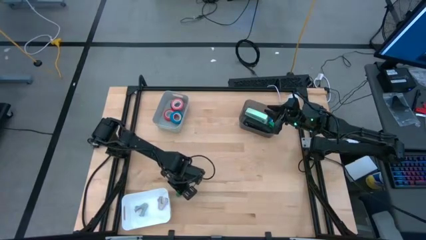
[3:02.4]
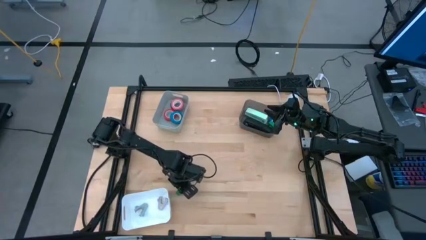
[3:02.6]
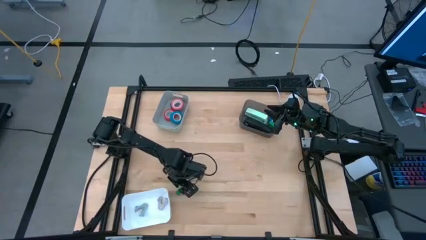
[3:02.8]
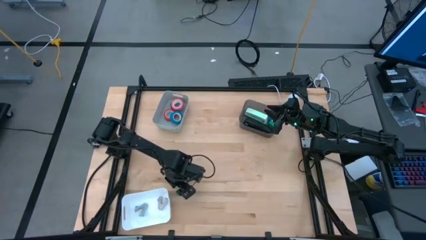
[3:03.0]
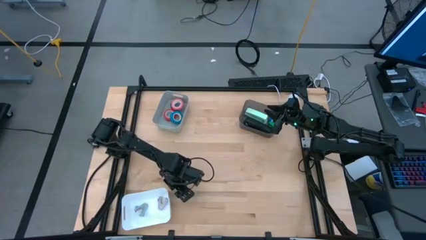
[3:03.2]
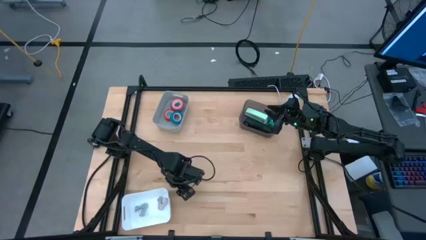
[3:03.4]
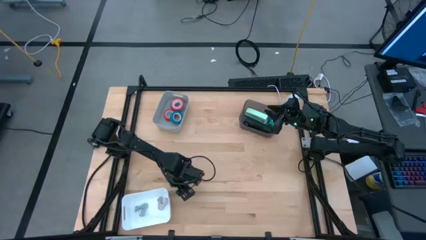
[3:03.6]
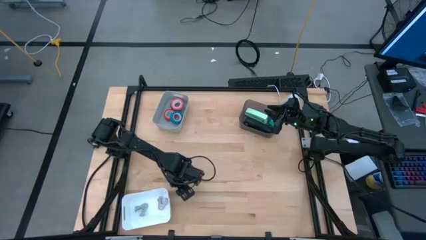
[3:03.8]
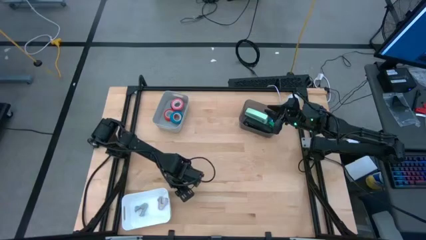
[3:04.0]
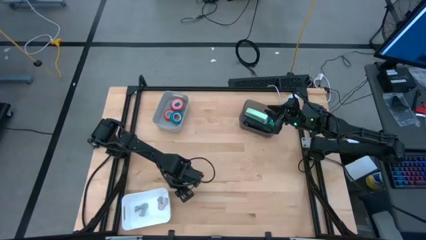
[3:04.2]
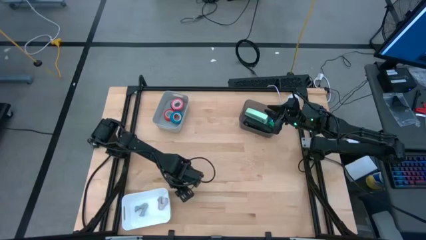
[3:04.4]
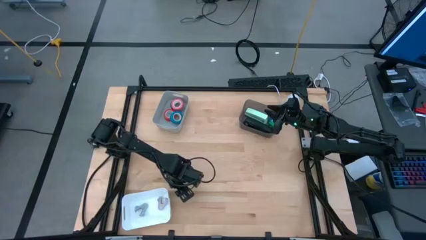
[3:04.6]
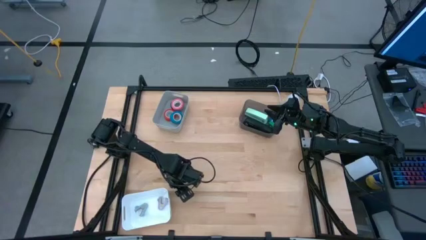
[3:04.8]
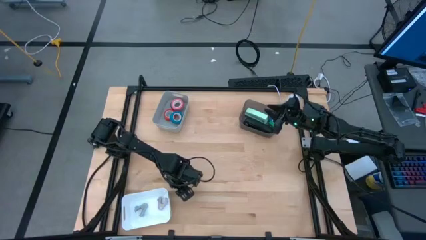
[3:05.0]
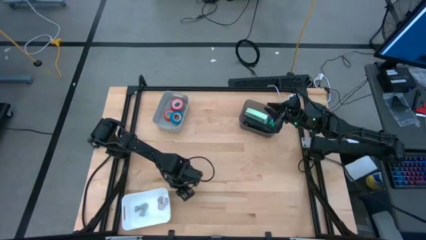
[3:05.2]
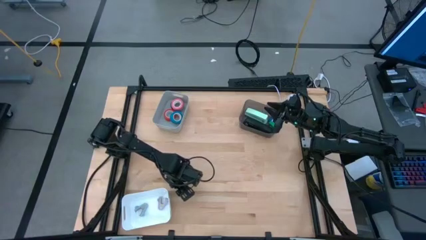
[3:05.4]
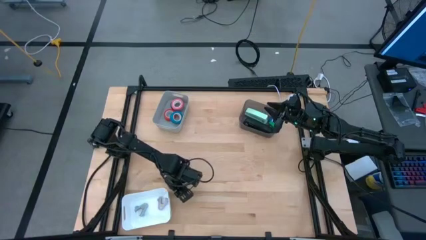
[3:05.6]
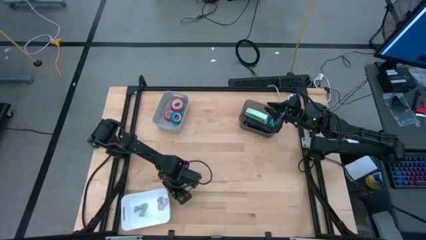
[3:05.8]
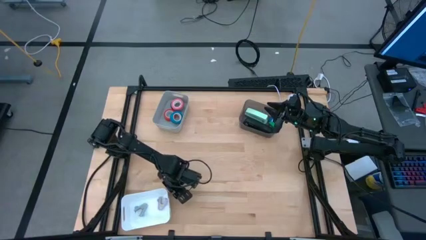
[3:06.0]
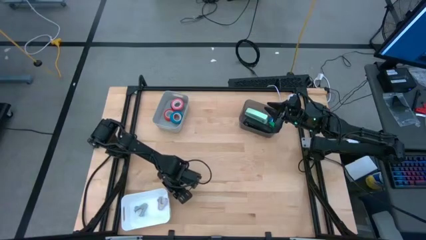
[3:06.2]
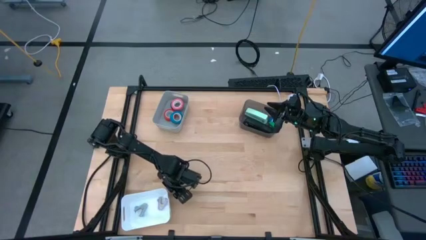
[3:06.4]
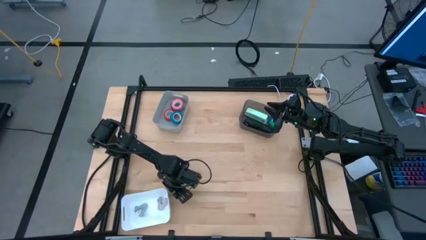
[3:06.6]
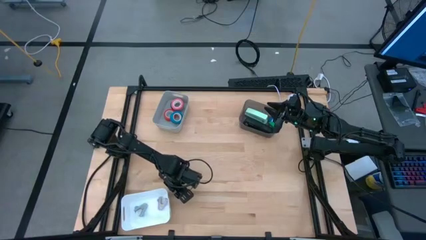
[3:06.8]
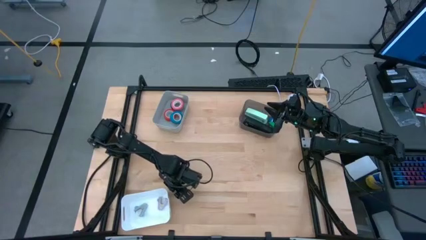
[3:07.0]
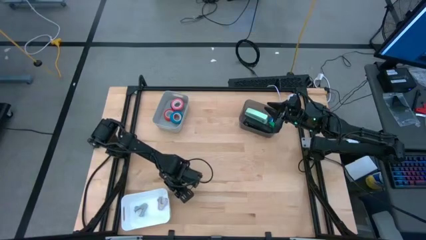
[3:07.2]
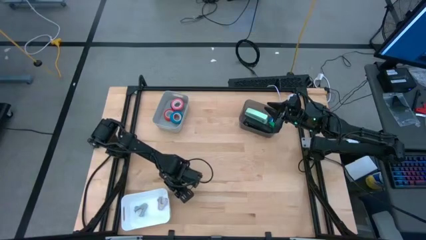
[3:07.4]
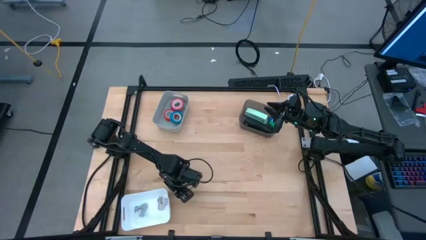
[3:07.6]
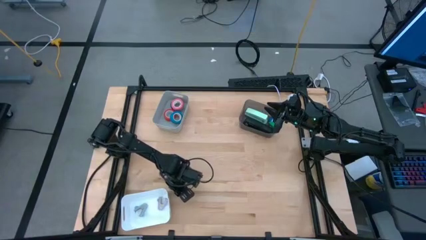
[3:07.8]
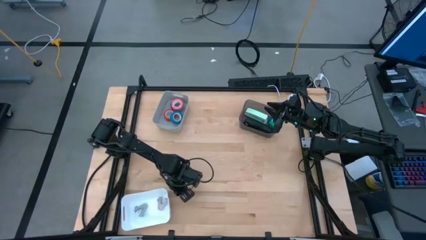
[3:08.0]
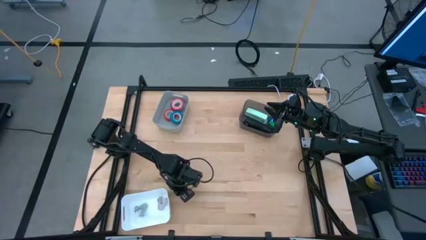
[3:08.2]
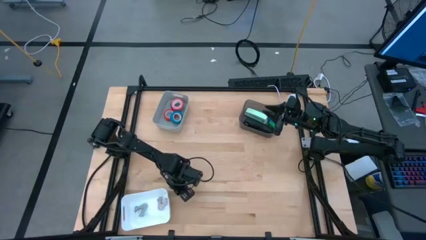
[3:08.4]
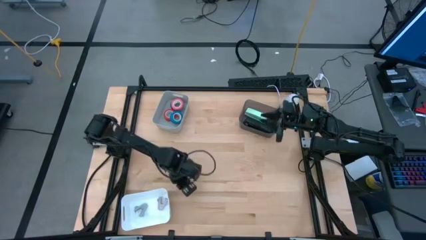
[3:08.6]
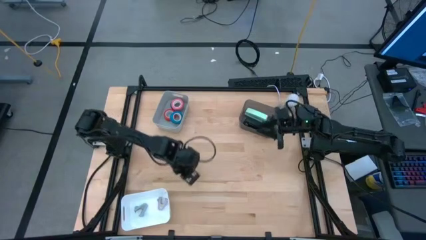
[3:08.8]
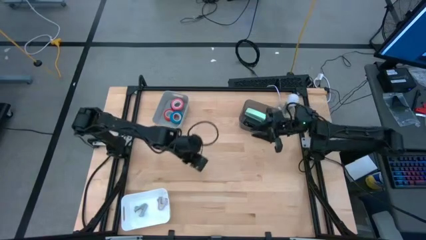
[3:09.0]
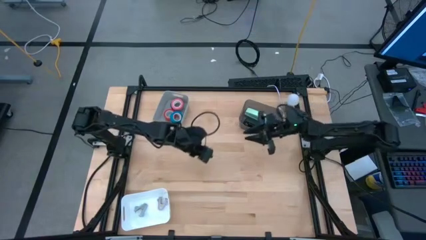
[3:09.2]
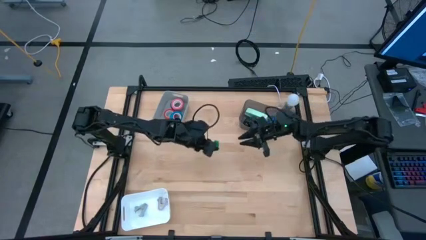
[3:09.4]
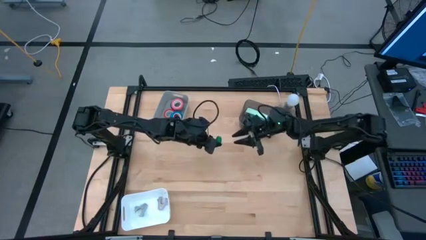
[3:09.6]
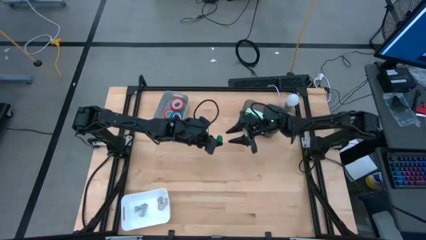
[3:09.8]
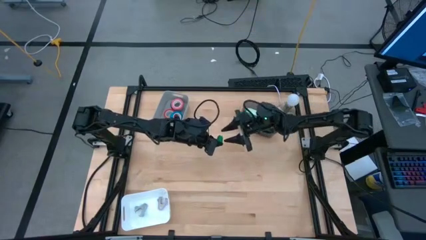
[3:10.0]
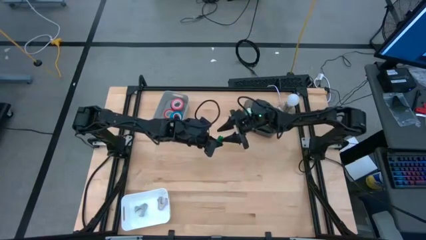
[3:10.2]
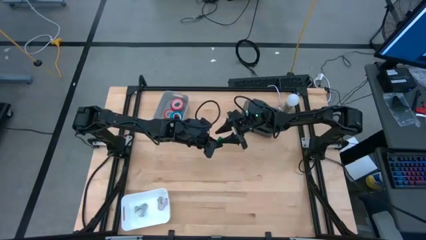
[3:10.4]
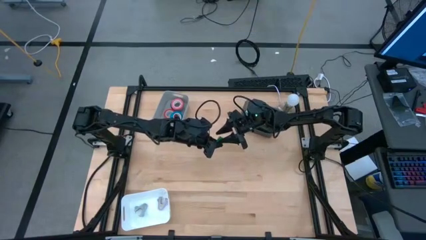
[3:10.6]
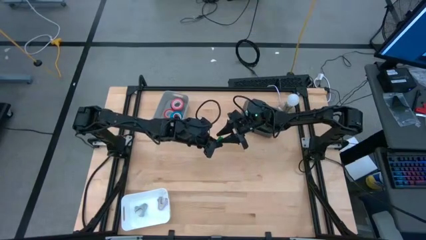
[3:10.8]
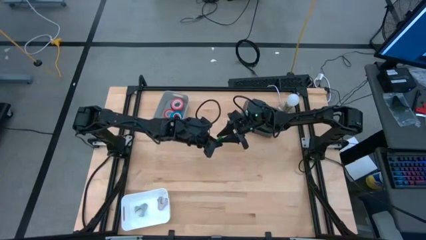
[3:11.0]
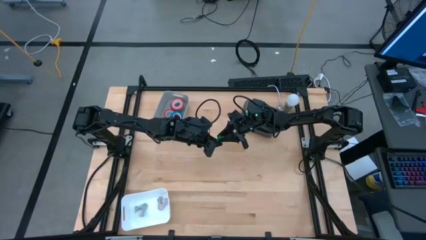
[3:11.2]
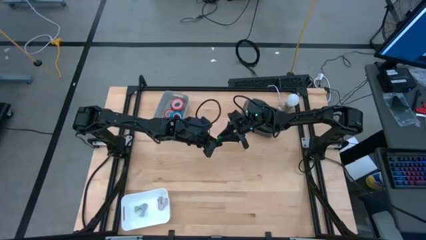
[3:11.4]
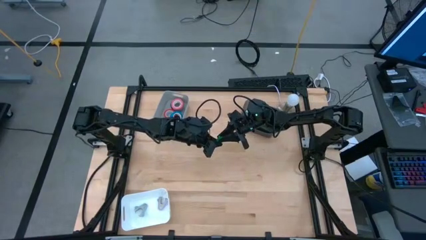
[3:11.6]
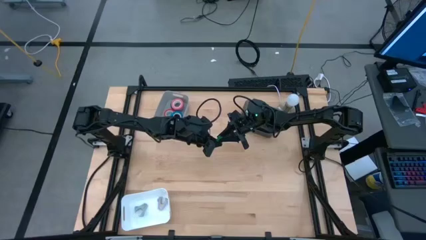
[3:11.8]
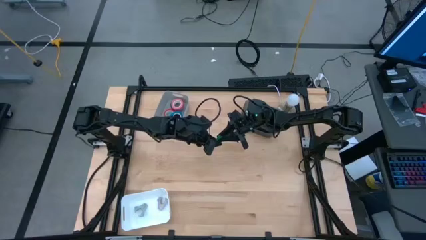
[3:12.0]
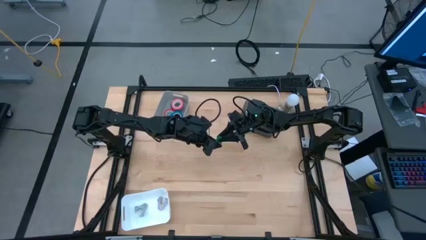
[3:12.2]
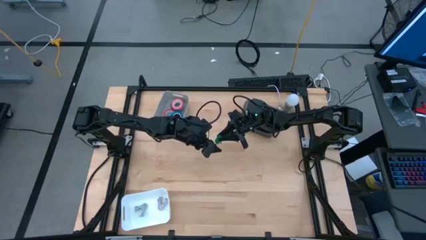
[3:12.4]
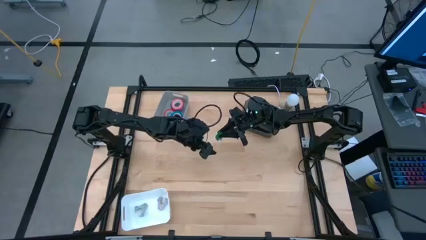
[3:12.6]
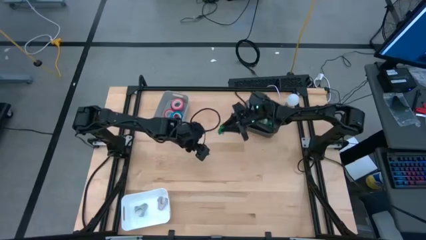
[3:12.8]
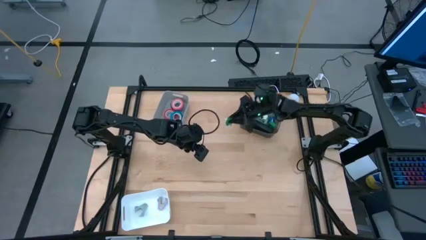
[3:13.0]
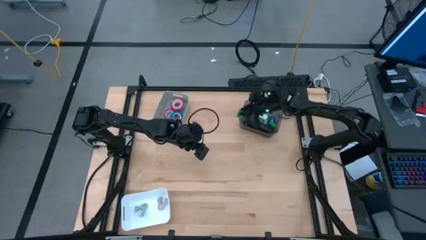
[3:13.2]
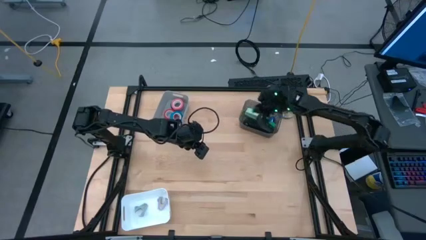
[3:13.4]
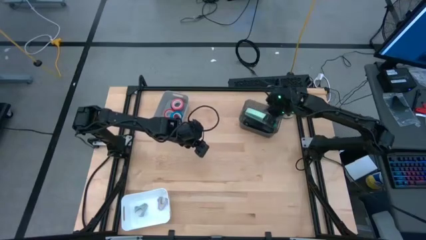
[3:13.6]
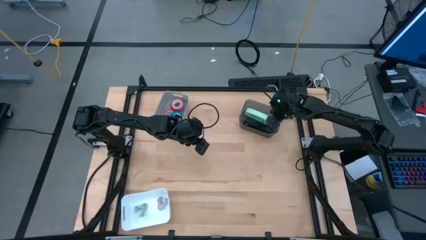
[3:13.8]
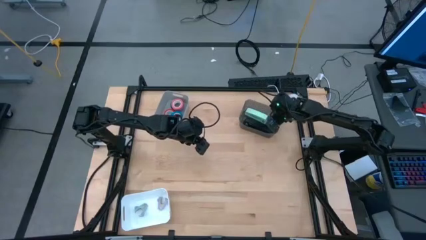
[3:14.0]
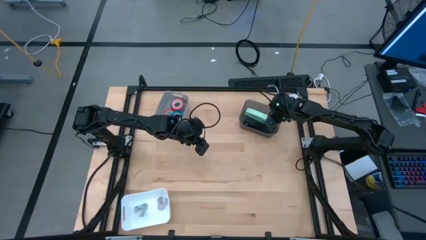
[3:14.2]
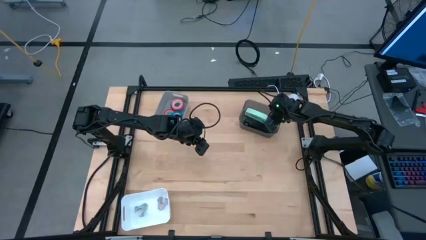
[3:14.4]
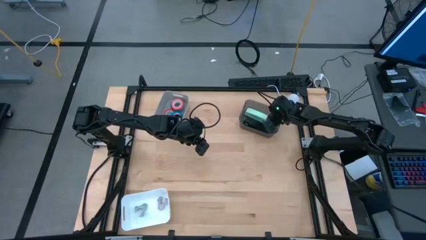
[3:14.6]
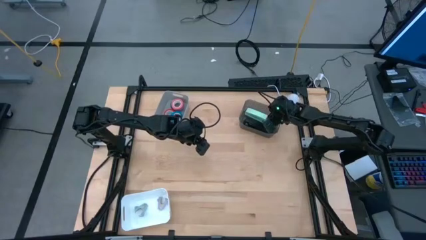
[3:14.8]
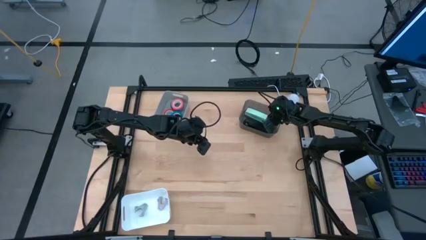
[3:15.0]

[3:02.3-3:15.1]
Task: Pick and place Stapler, Stapler remover, tape
Put the green stapler into the black bin

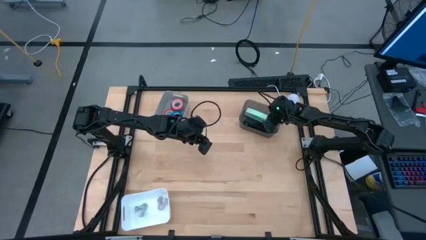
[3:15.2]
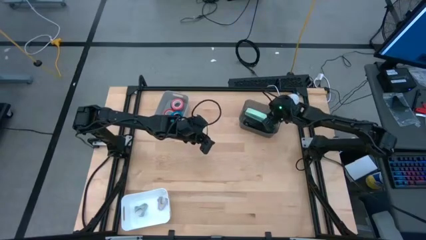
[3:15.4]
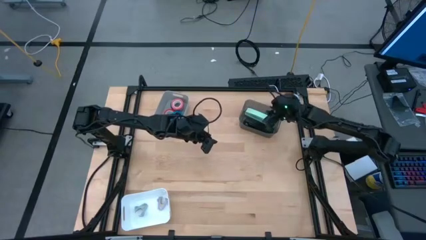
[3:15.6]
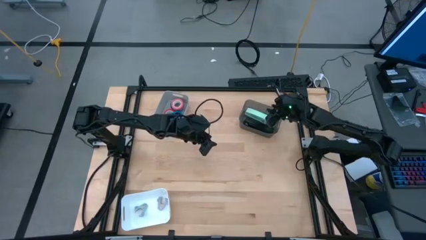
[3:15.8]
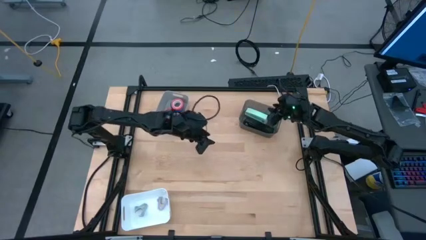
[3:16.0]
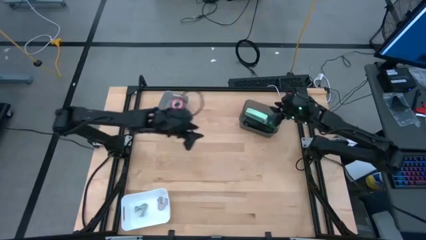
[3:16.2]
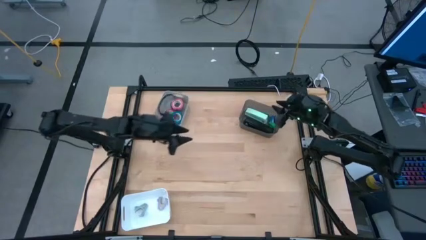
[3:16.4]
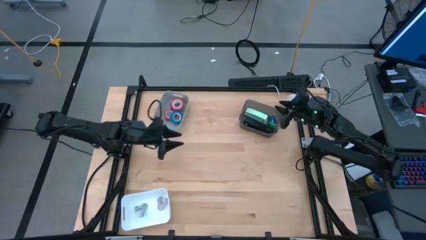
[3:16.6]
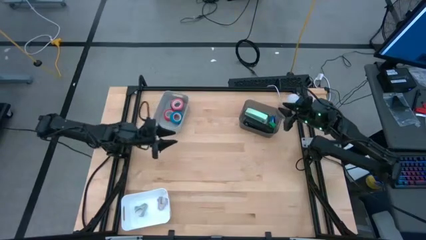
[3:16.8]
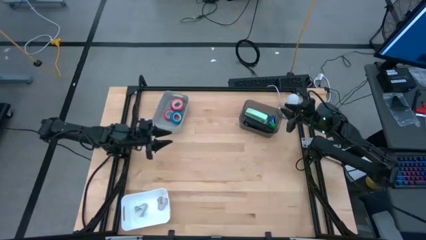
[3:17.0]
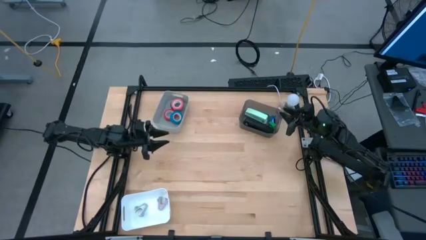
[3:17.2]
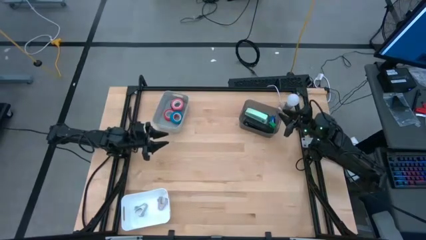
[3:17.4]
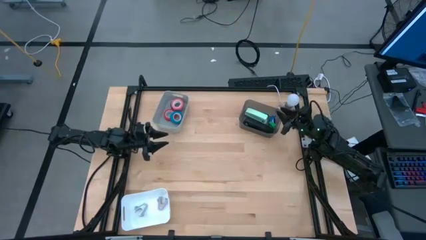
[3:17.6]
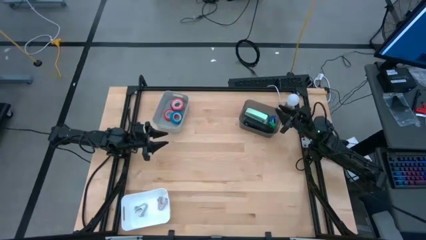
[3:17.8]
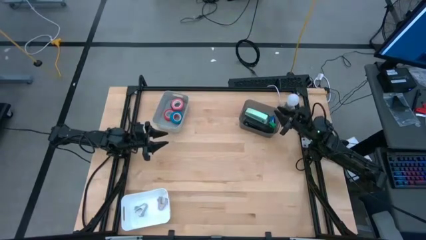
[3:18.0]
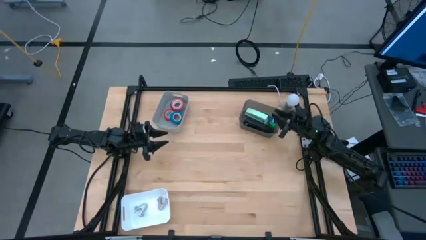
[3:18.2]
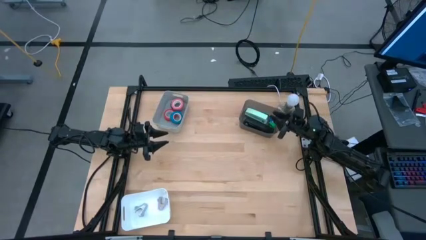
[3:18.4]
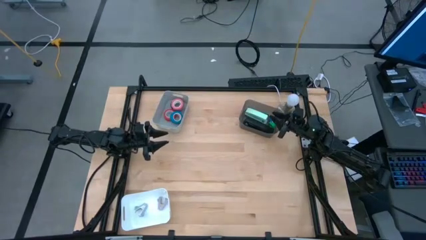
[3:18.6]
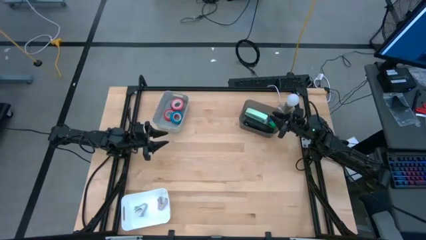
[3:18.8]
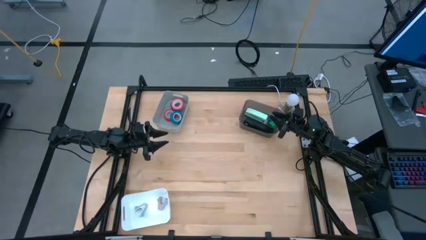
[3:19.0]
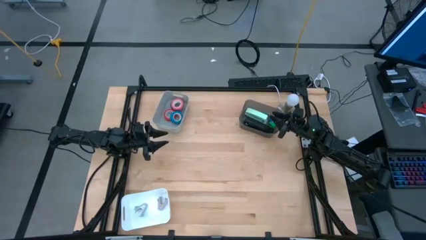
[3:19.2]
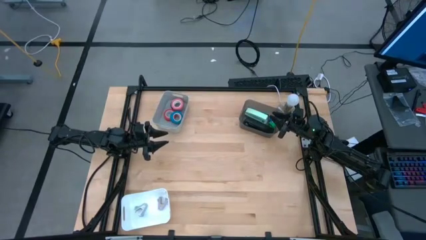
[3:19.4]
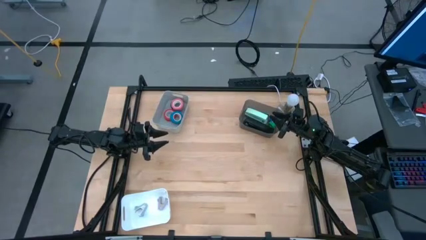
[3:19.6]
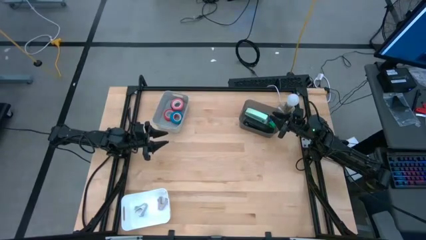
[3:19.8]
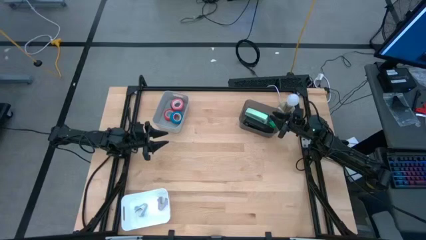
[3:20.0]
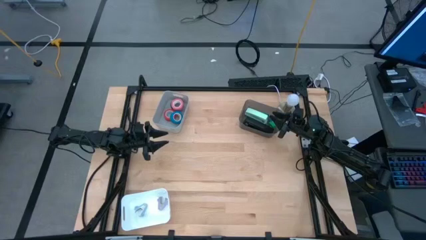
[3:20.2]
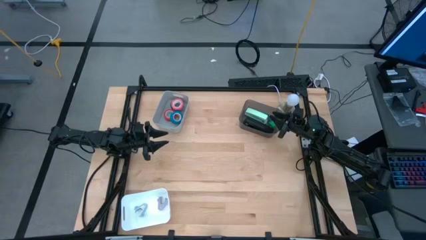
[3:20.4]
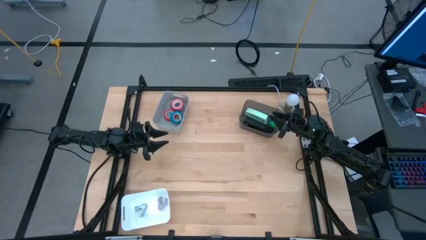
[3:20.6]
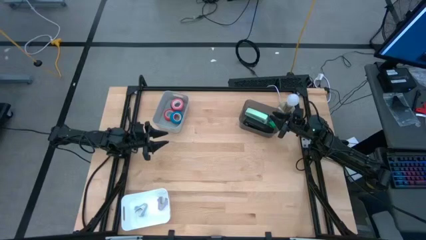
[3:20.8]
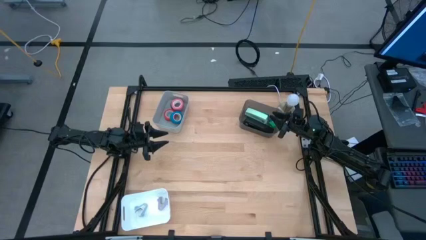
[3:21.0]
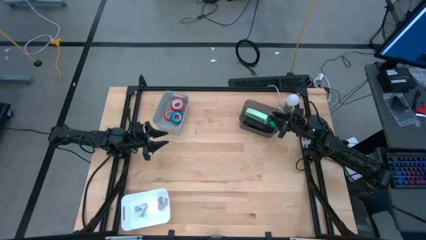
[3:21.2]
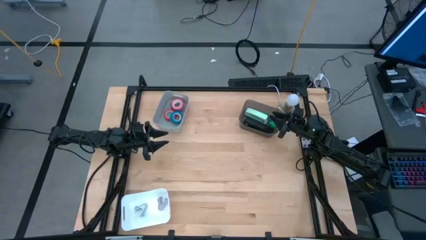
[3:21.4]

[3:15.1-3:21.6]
Return to Home Position
